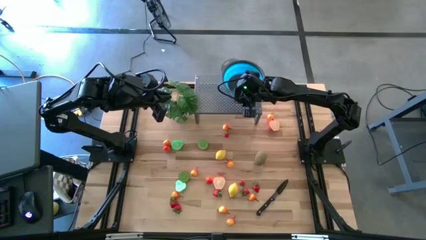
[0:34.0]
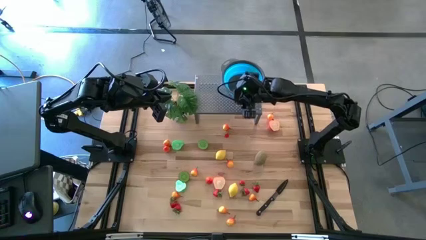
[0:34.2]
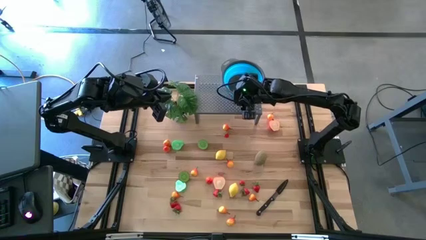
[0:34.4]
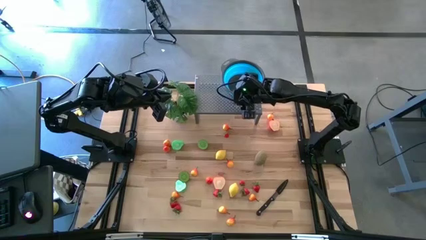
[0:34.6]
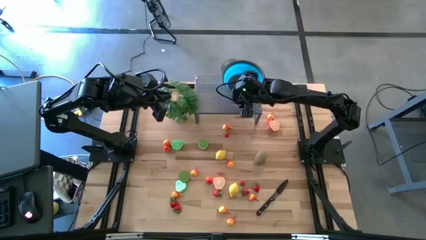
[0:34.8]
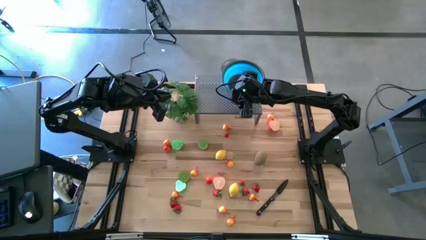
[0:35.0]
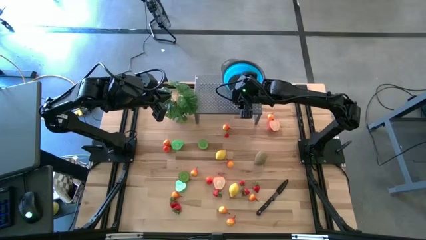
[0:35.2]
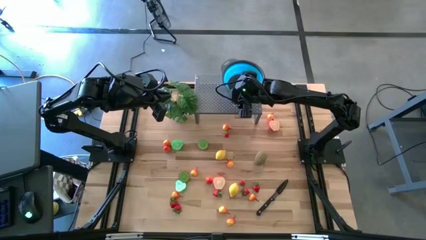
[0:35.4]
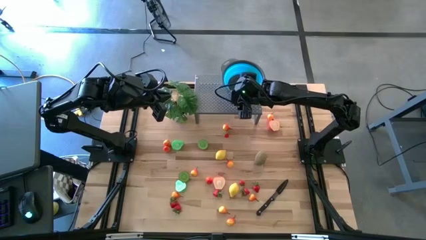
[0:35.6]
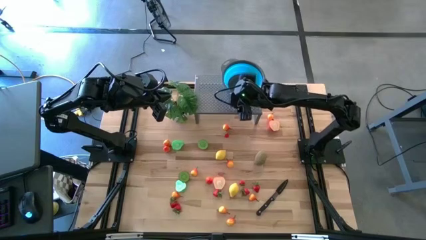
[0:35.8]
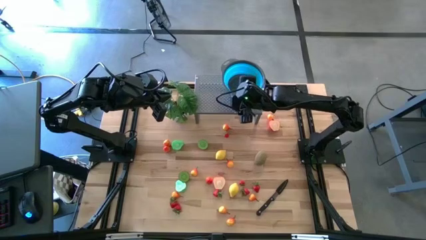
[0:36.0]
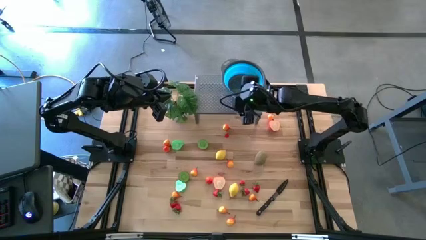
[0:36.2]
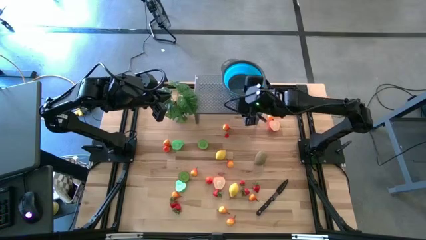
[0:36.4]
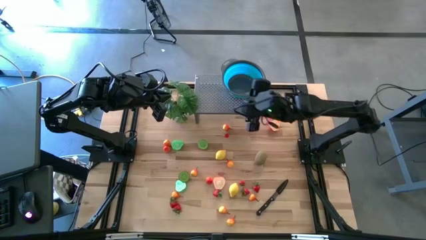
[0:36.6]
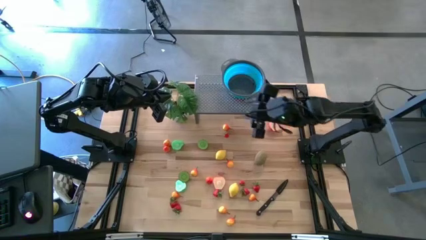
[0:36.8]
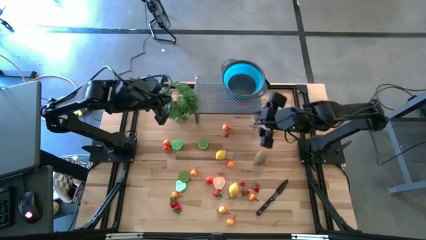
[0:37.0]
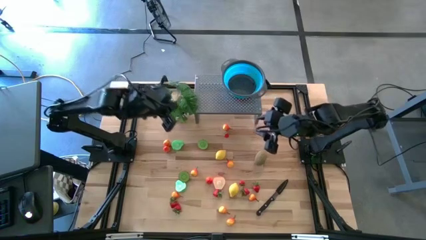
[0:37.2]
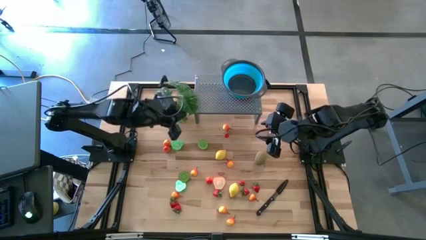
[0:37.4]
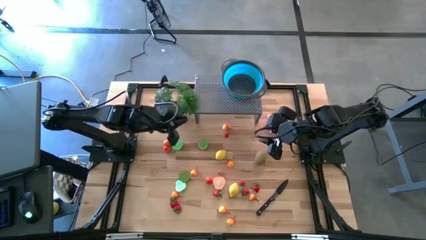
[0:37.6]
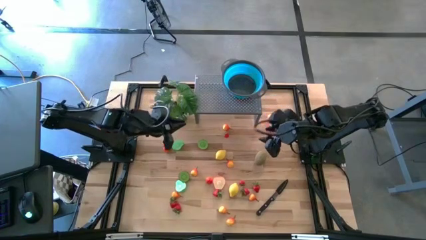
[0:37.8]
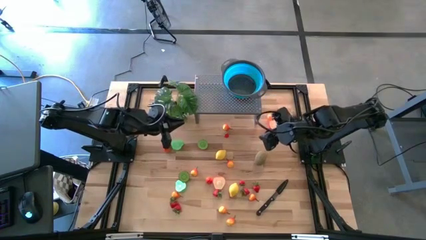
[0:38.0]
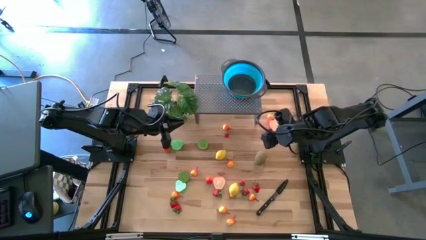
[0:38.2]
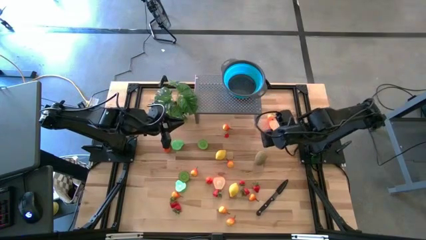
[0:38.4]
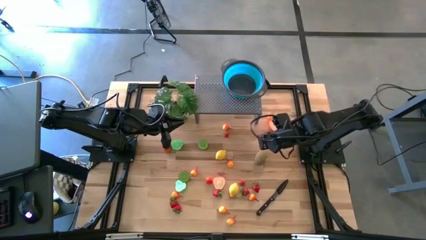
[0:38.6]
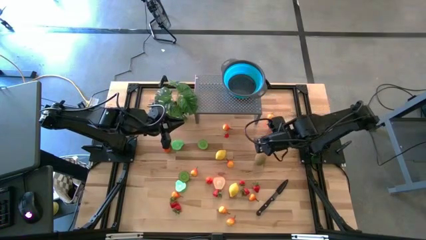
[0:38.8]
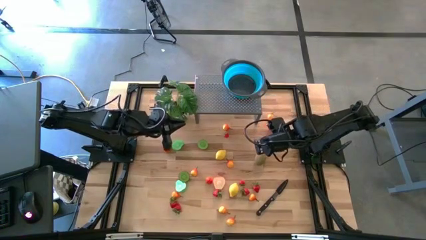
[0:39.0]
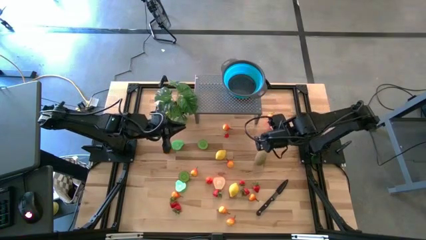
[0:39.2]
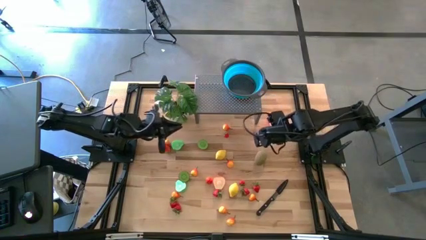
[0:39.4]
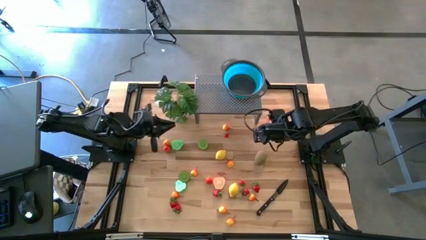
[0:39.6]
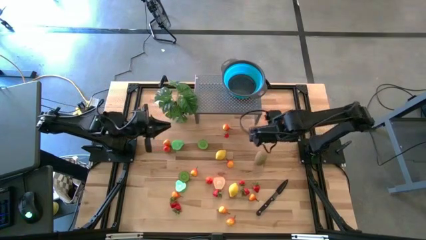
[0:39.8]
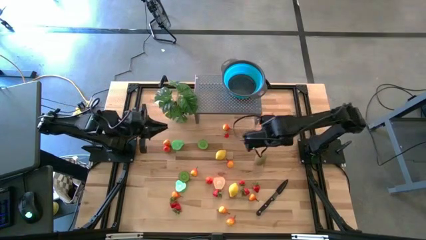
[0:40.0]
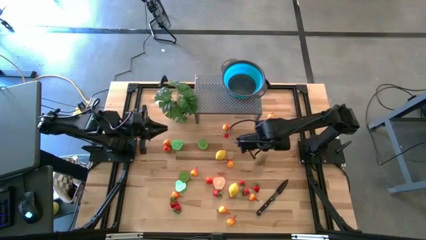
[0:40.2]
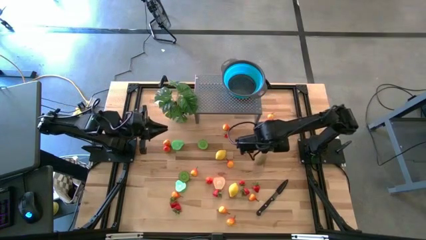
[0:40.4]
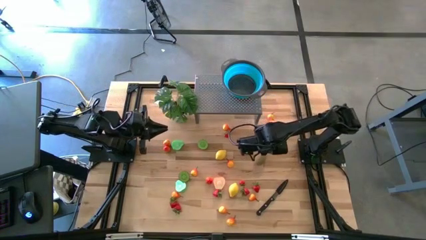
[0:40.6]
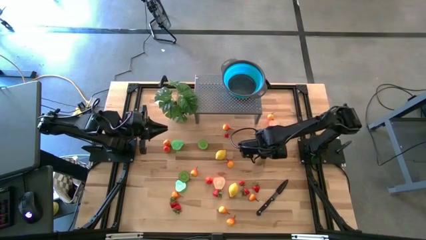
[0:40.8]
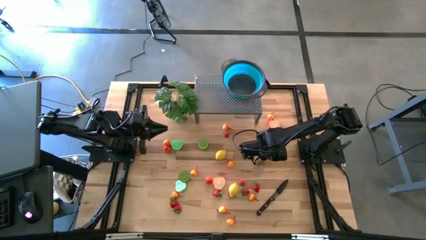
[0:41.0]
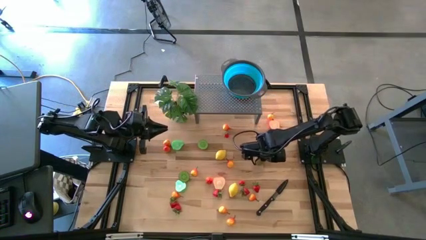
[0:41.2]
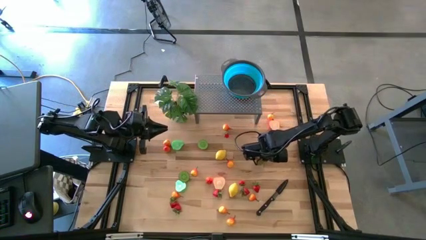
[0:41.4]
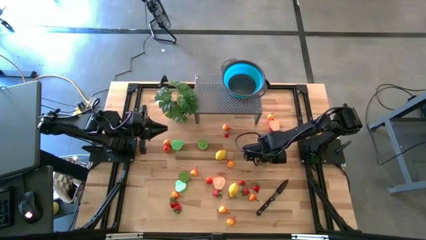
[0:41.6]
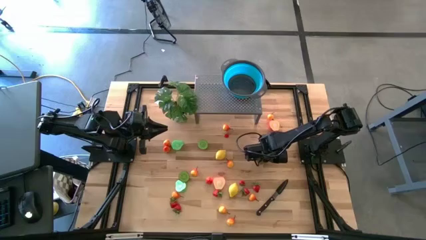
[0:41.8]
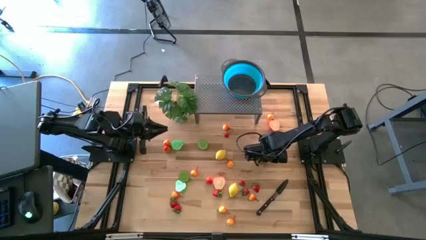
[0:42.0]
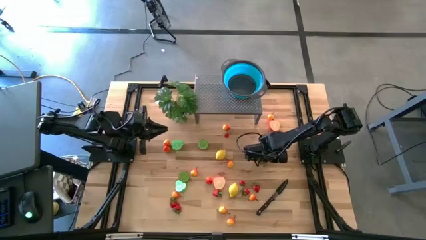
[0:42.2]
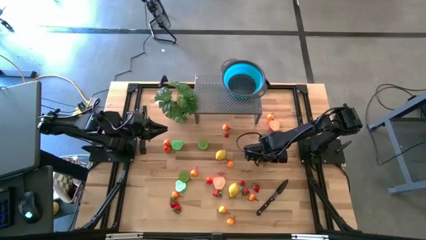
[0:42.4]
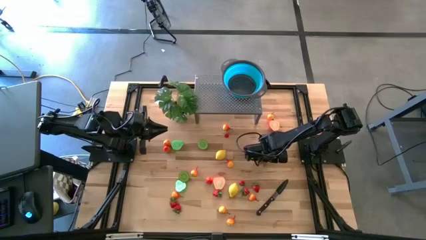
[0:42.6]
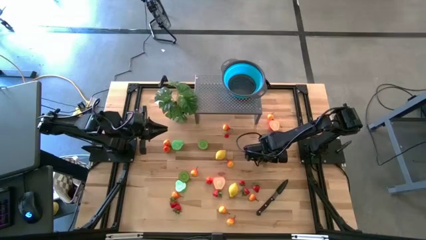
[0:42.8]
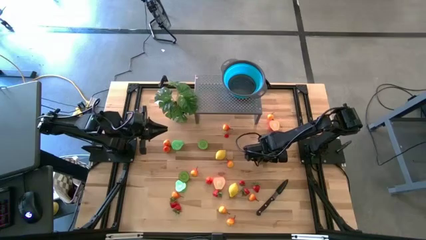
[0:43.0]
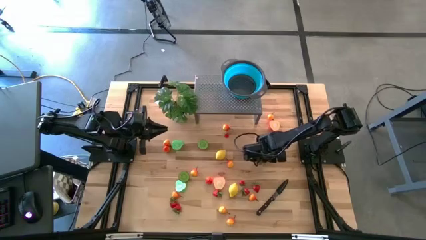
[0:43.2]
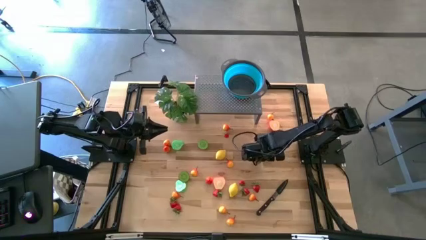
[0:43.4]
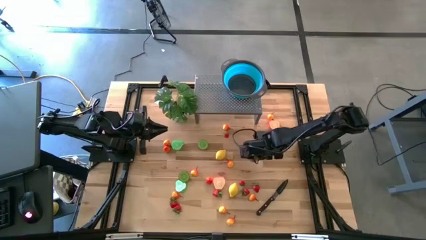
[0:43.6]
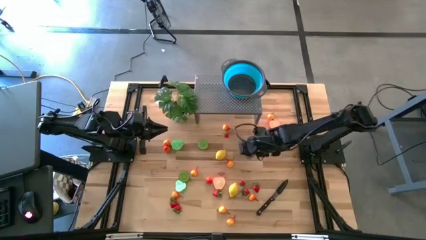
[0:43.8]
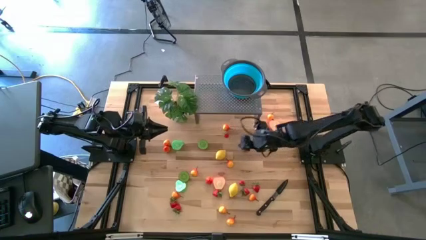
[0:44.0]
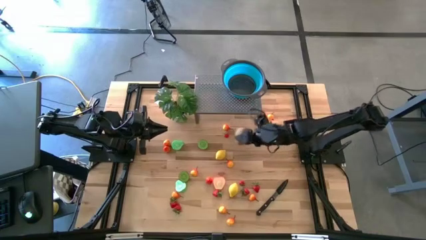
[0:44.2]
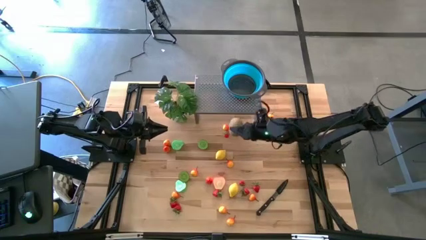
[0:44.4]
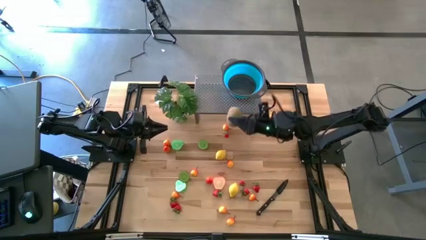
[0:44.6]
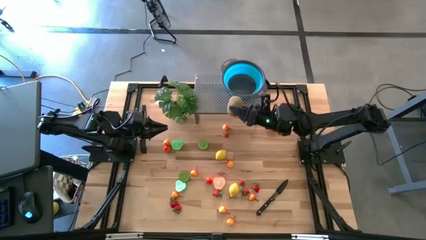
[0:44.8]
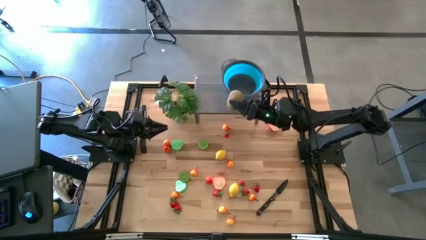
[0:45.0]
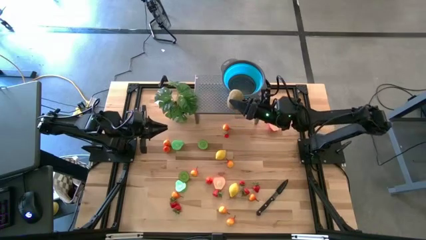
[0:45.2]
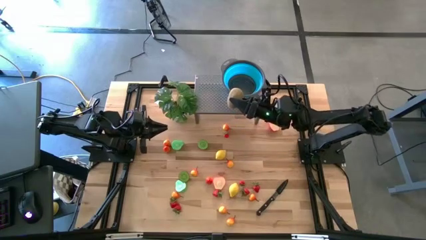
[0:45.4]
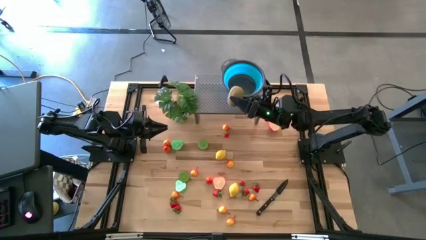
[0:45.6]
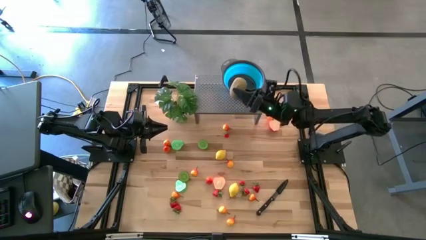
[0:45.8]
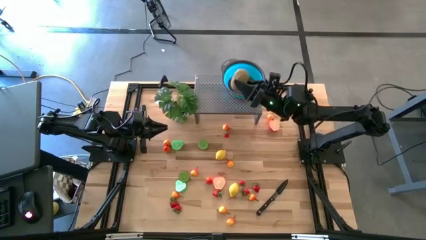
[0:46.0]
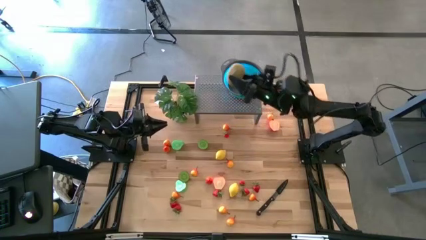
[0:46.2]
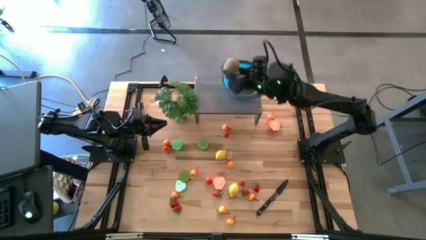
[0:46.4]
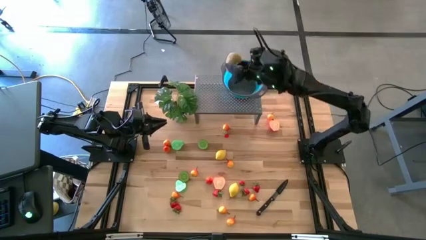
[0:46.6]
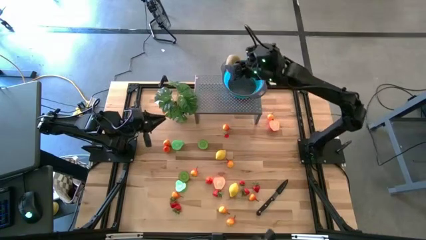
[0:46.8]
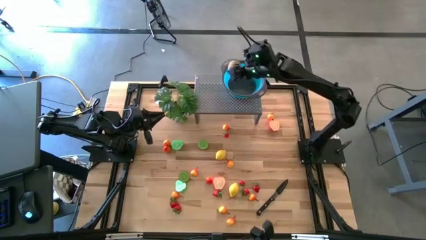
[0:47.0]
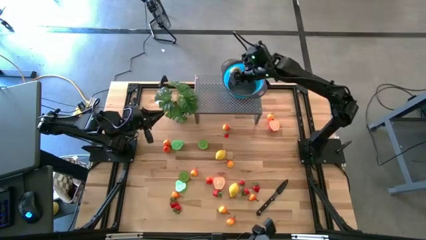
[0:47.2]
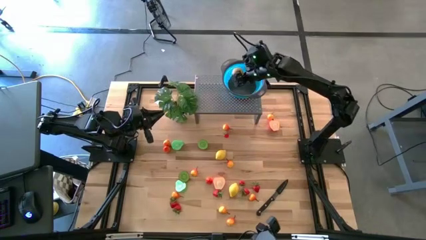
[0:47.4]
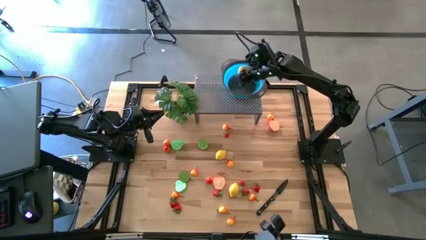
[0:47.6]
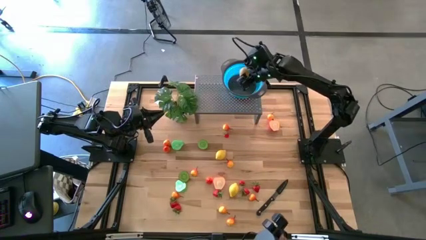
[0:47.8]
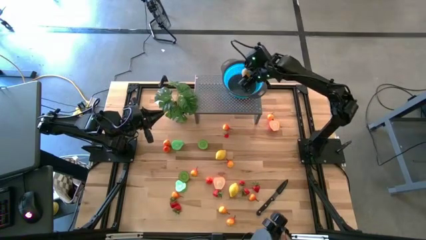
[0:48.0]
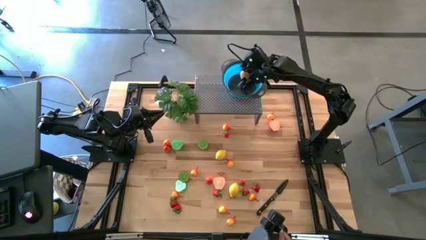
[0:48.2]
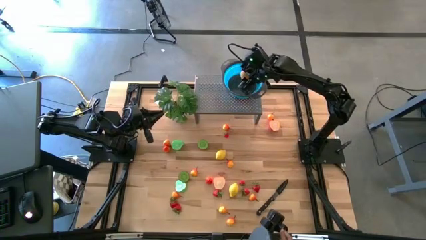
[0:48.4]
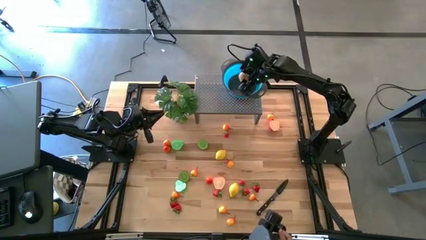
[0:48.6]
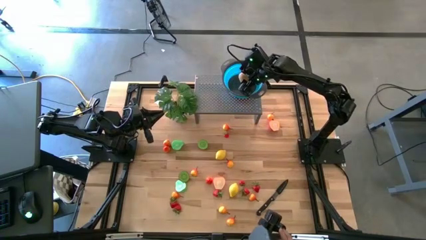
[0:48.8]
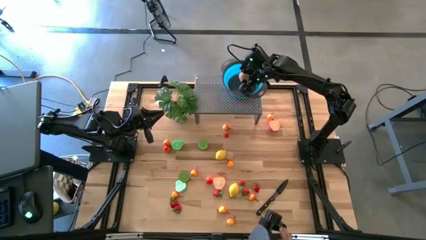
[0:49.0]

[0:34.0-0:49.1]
Task: Pick & Place Fruit
Put the brown kiwi in the blue bowl on the shelf

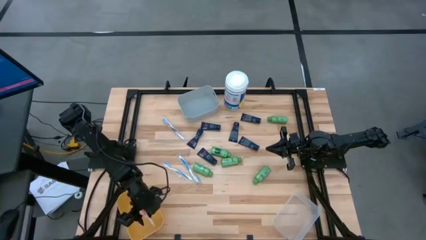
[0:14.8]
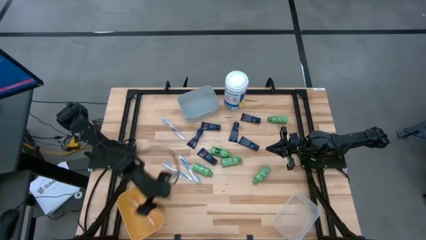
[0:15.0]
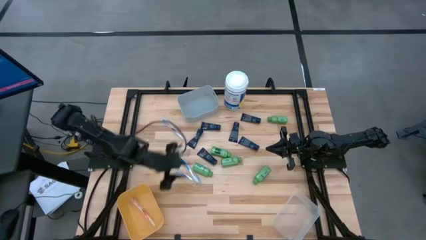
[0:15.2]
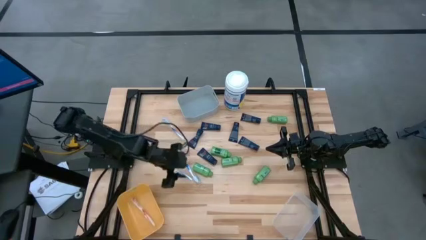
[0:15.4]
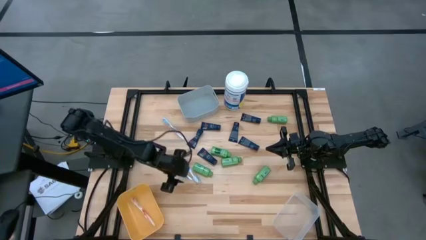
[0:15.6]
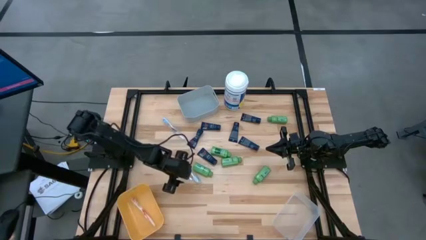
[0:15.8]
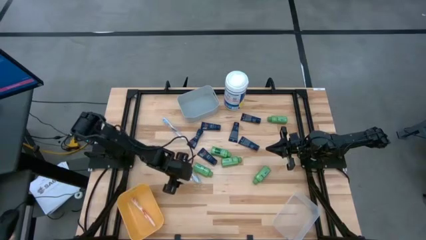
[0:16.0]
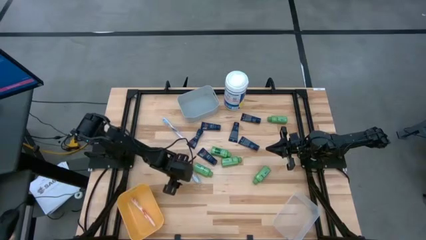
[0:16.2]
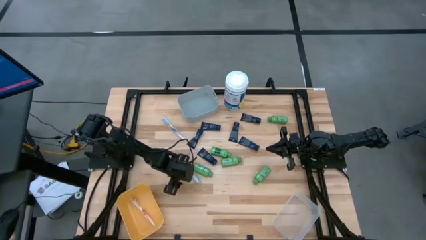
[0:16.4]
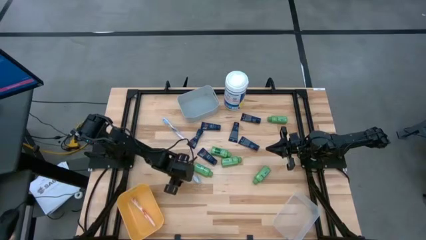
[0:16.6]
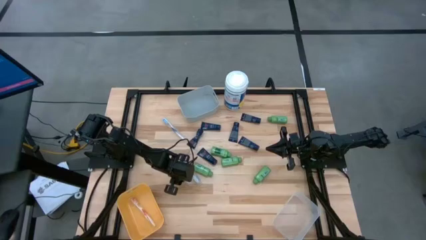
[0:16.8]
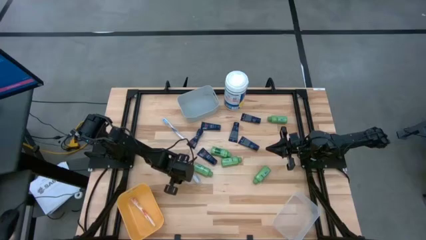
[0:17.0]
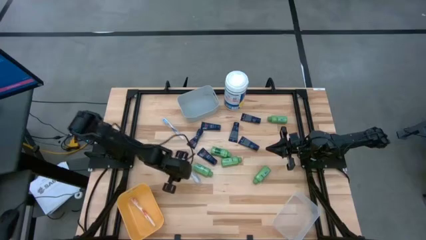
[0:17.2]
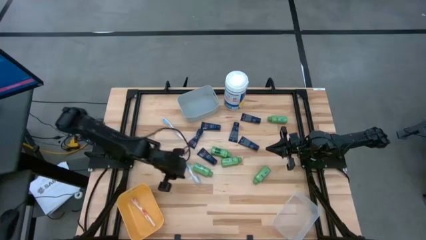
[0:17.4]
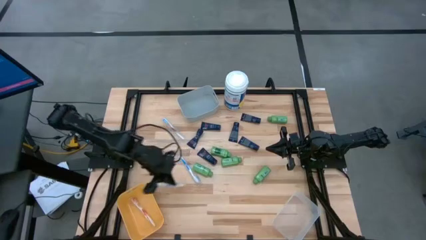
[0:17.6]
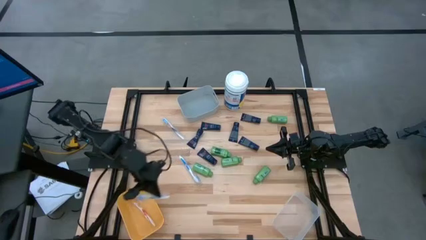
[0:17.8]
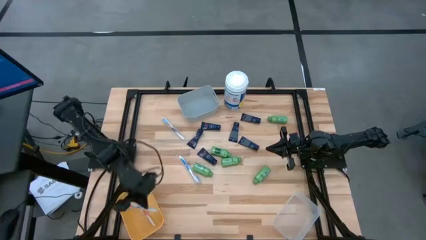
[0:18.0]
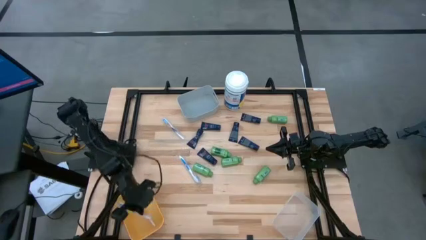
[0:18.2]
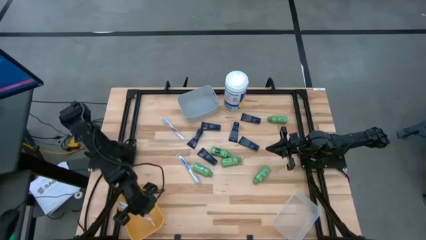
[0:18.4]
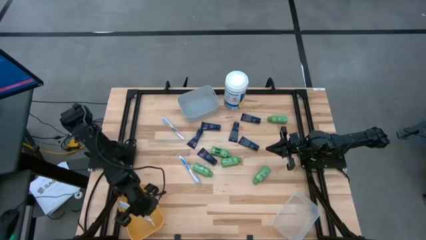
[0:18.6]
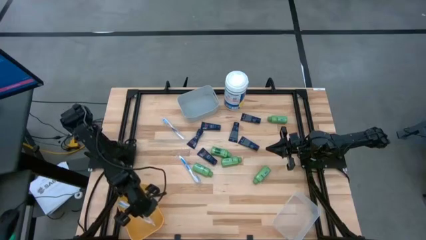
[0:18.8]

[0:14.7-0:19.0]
Task: Pick & Place Travel size toiletries
Put the blue toothbrush into the yellow bin
